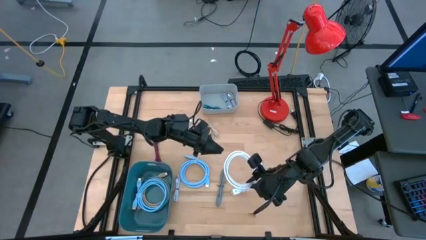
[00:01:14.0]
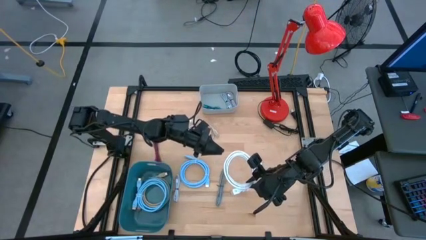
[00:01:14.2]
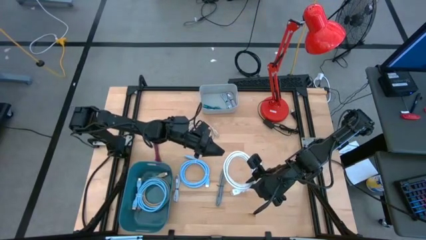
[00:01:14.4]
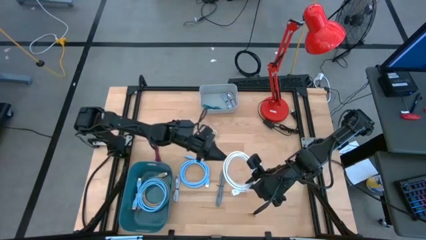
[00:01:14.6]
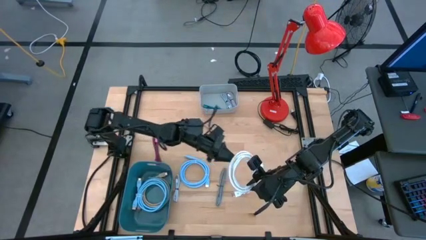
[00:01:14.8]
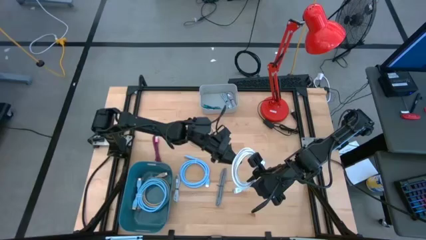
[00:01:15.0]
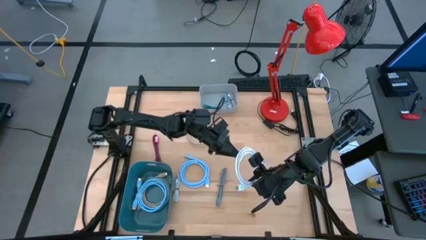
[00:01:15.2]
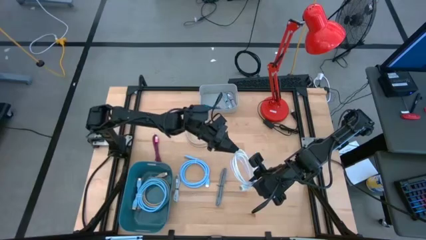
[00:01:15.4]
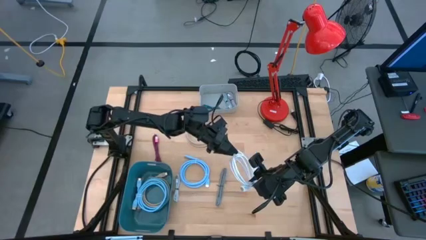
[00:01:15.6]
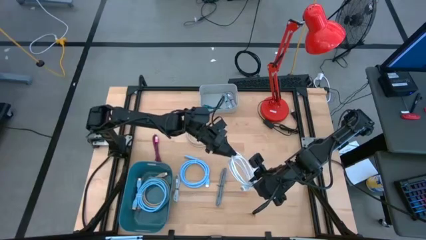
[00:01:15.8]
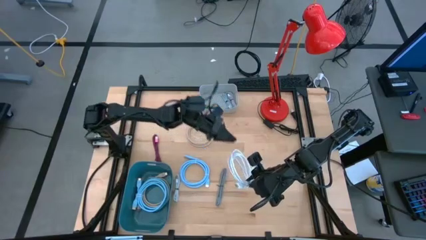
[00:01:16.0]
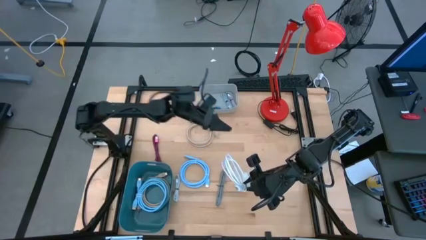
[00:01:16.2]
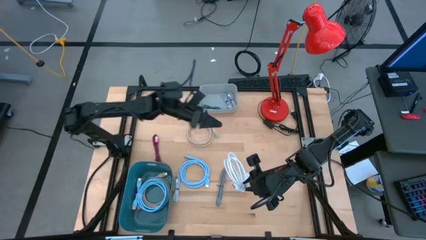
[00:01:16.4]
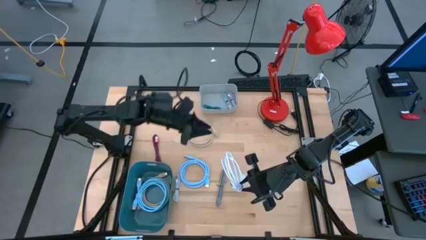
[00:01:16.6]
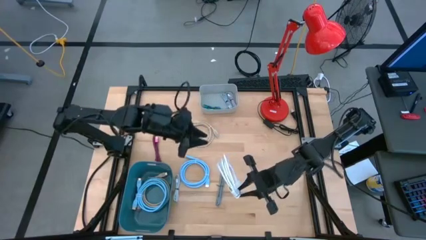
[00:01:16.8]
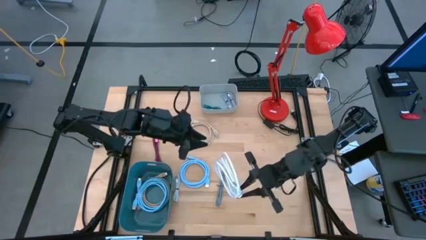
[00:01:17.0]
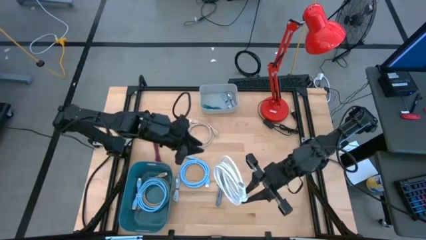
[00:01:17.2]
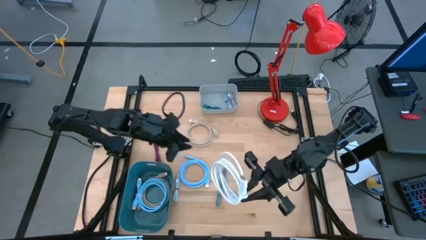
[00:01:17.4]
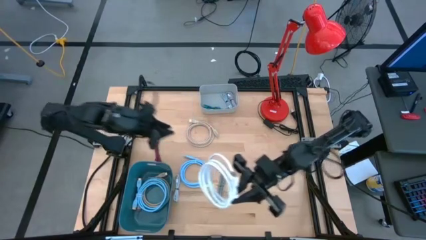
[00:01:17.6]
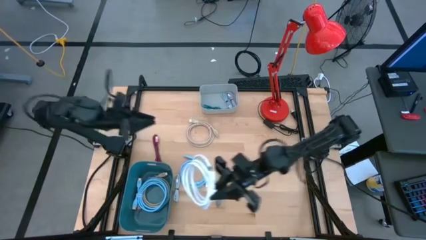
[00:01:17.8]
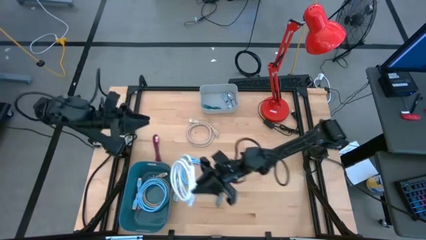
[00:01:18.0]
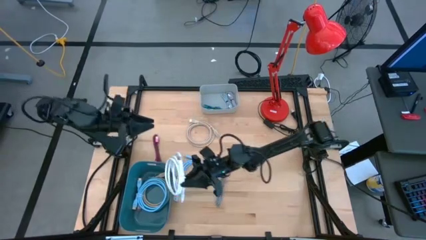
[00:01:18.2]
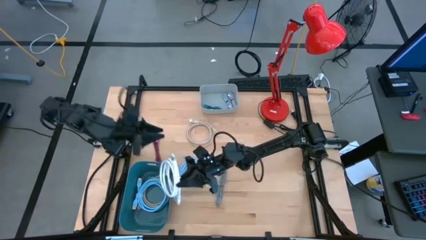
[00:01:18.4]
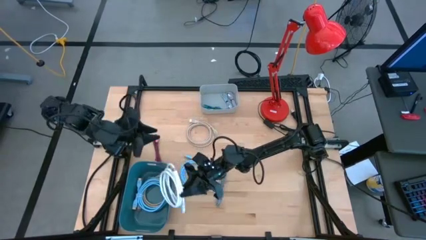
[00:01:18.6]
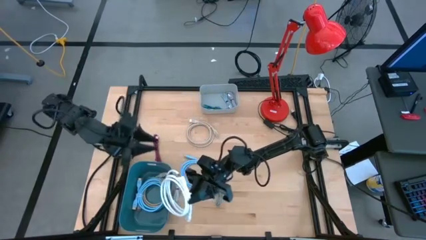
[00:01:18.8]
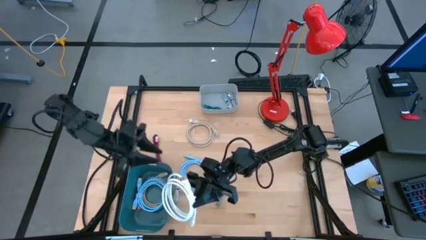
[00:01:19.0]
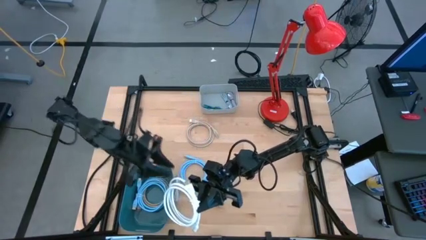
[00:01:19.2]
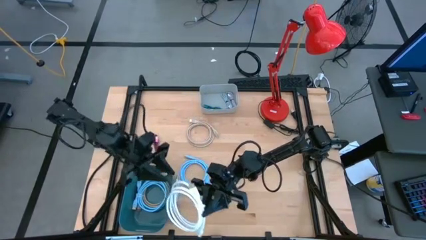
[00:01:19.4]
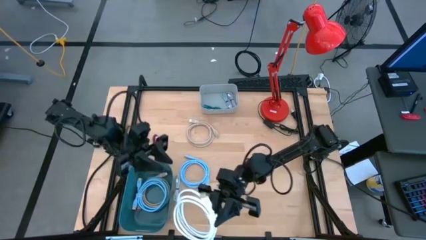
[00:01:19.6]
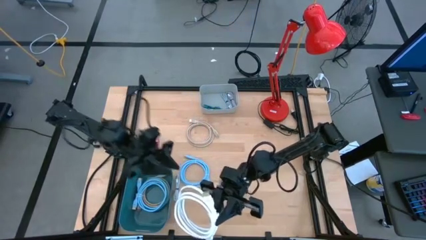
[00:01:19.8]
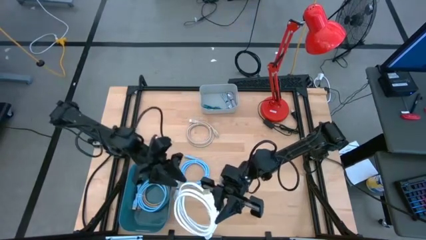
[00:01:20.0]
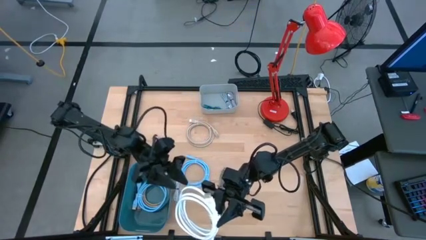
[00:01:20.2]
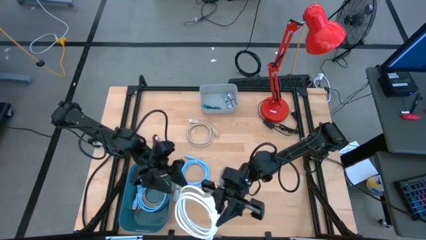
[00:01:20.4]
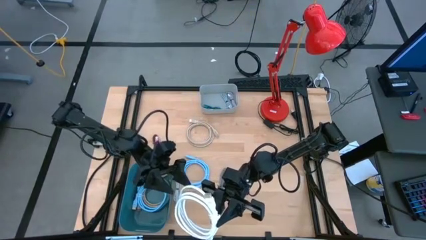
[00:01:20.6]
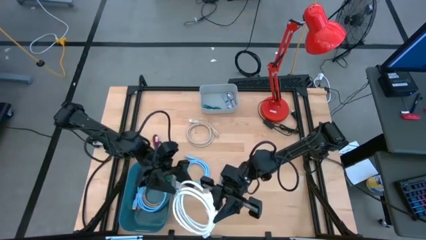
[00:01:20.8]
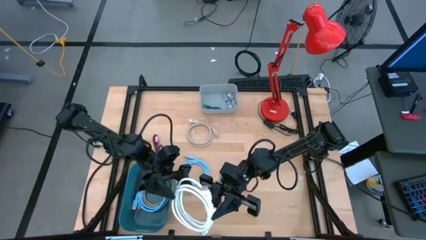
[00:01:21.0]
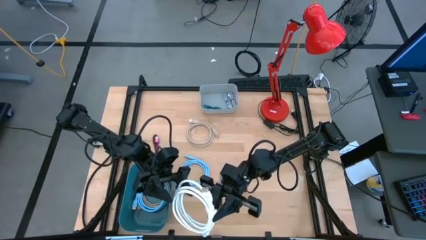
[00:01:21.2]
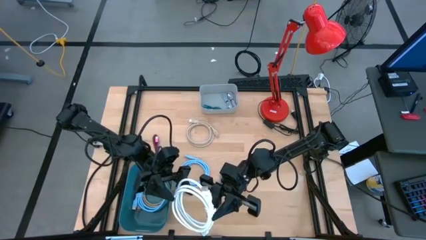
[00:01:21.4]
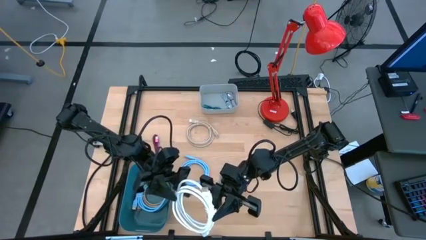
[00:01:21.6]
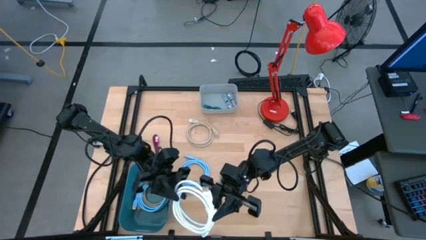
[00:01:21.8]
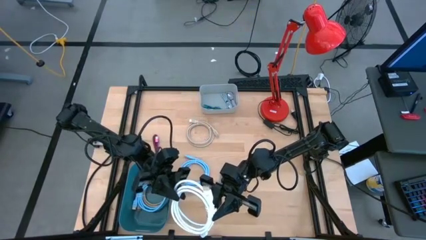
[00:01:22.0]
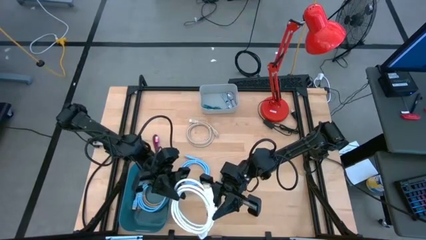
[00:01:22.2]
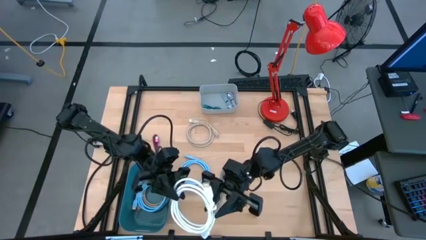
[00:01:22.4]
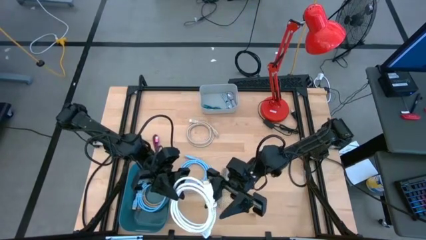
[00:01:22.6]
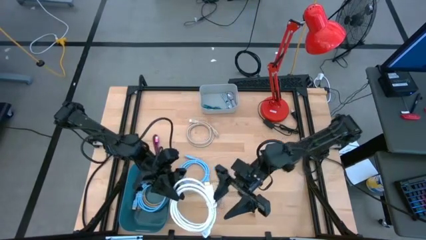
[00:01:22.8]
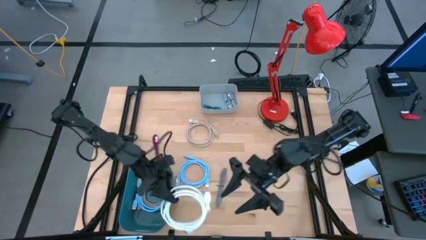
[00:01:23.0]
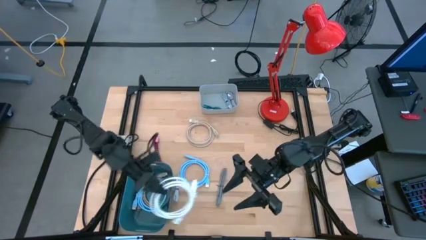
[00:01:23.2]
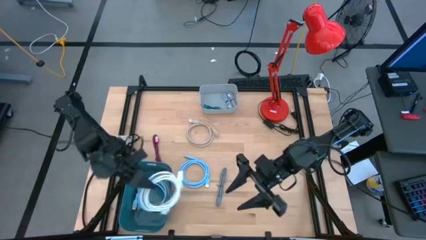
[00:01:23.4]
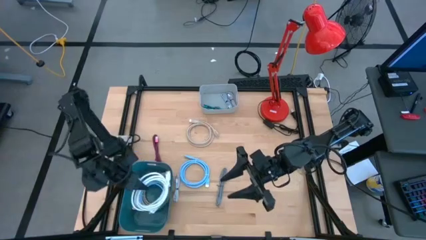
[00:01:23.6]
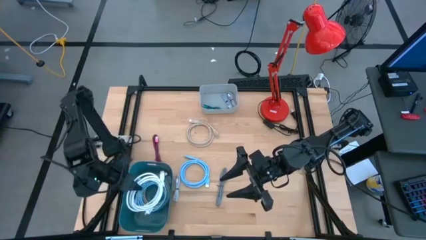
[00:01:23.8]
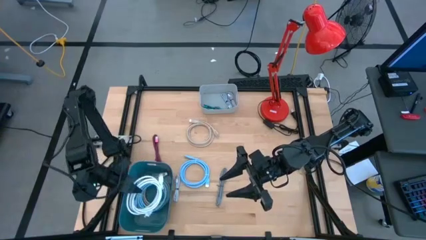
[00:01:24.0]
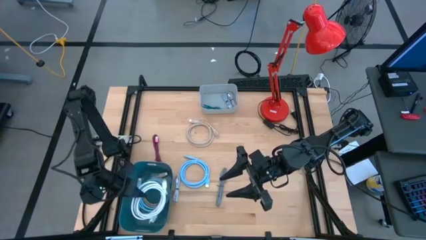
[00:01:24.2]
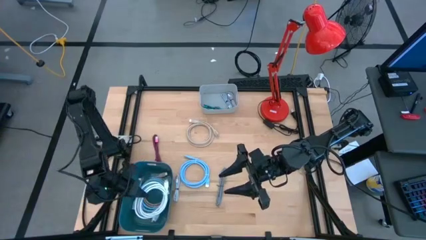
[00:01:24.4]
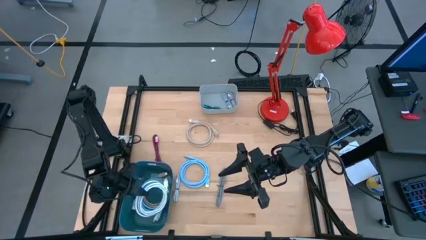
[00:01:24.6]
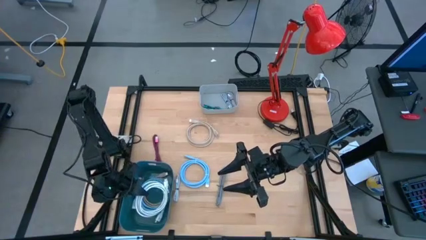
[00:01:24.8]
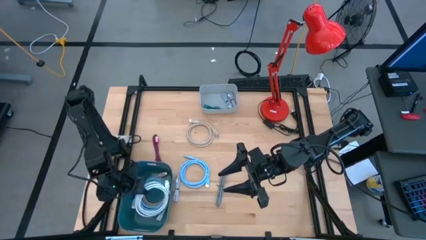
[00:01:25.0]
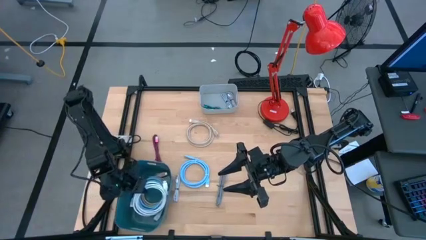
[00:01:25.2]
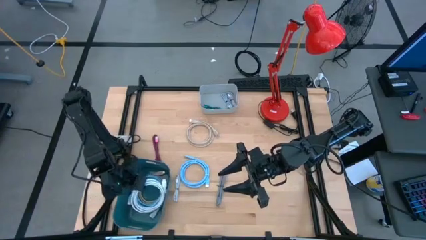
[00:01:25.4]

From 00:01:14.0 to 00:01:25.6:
Task: Pick & Place USB Port
Put the white HDMI cable into the blue bin

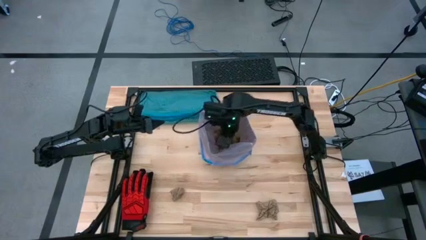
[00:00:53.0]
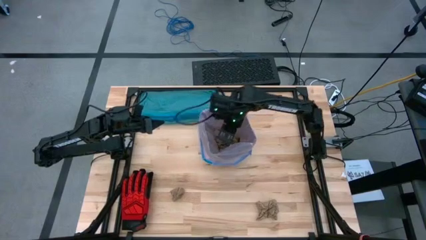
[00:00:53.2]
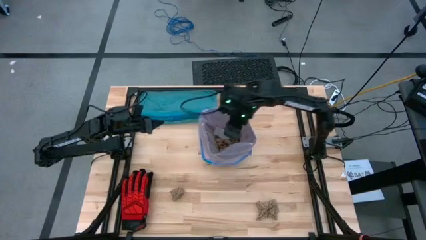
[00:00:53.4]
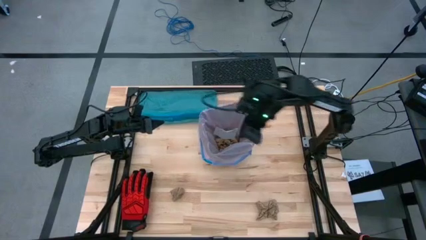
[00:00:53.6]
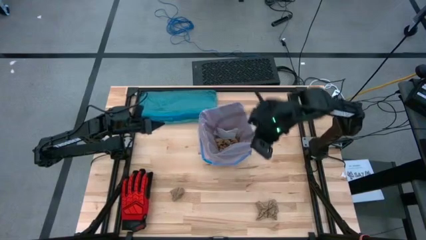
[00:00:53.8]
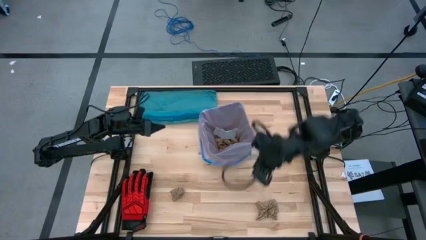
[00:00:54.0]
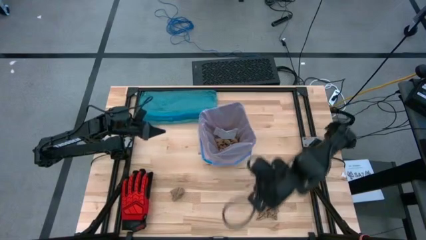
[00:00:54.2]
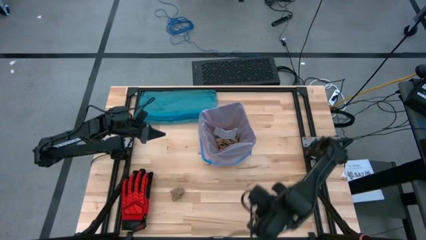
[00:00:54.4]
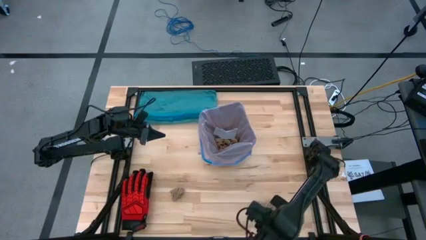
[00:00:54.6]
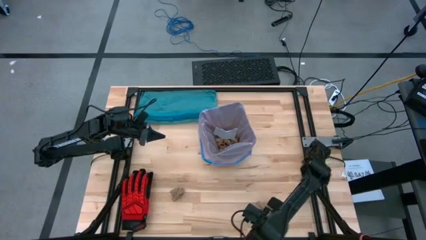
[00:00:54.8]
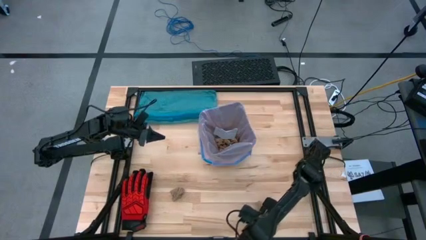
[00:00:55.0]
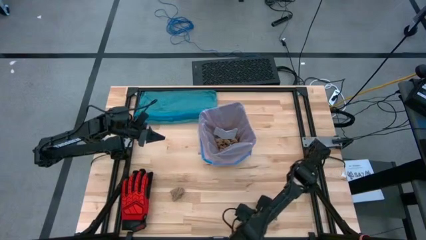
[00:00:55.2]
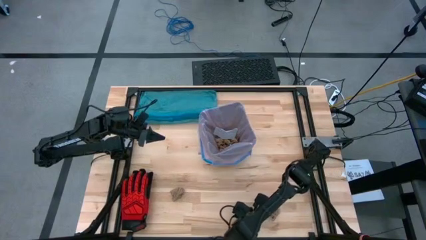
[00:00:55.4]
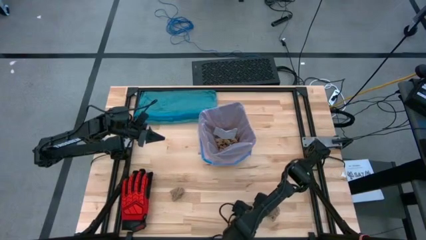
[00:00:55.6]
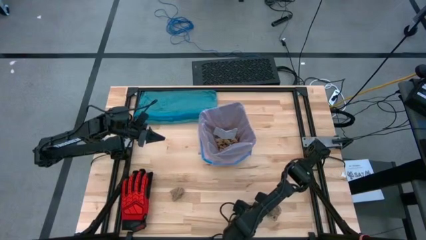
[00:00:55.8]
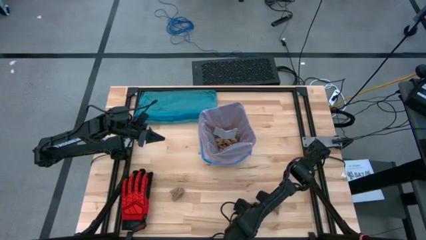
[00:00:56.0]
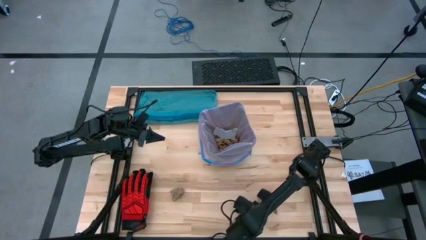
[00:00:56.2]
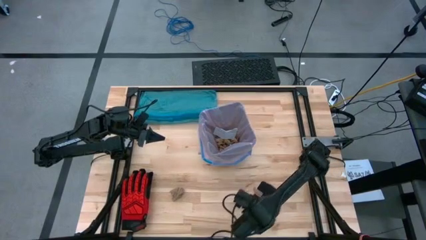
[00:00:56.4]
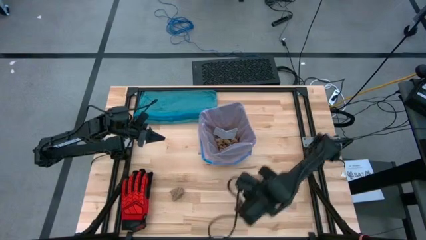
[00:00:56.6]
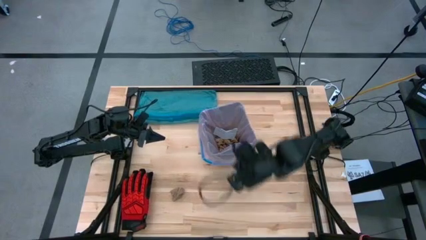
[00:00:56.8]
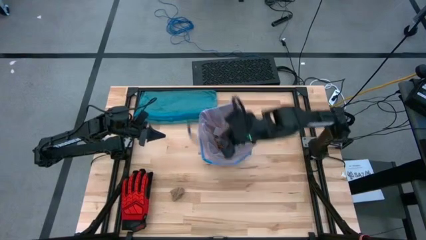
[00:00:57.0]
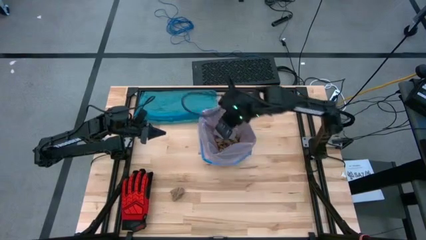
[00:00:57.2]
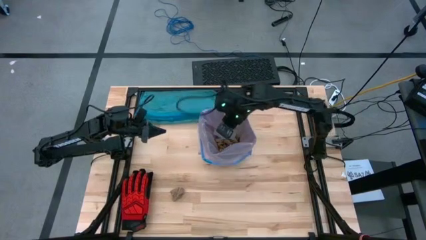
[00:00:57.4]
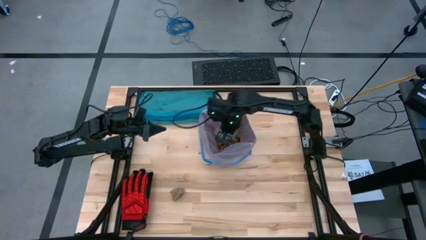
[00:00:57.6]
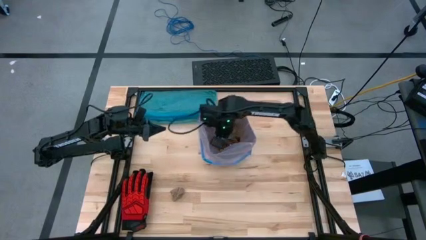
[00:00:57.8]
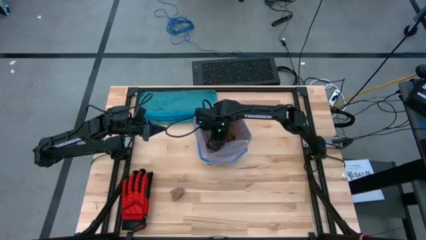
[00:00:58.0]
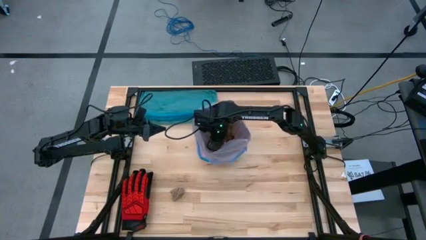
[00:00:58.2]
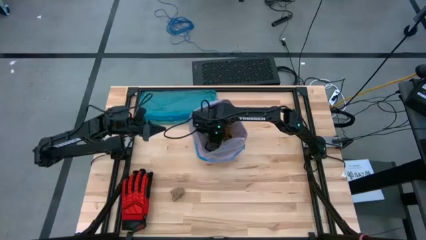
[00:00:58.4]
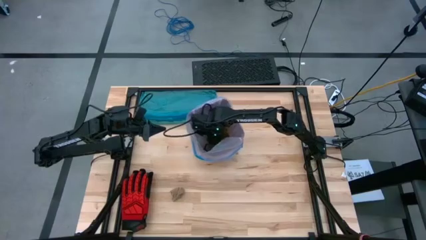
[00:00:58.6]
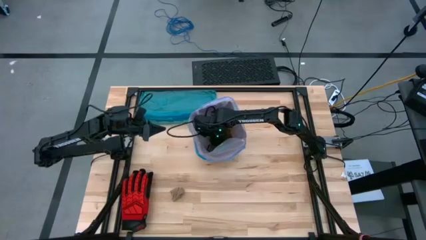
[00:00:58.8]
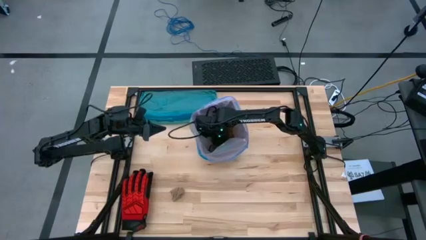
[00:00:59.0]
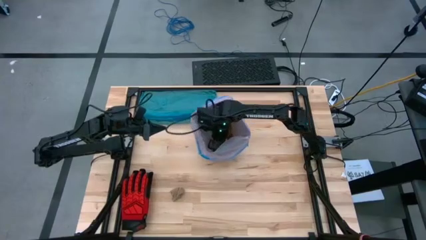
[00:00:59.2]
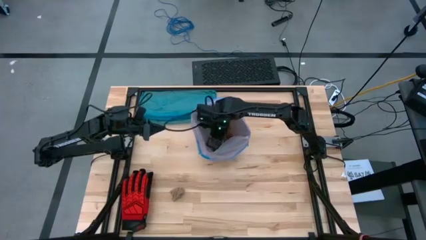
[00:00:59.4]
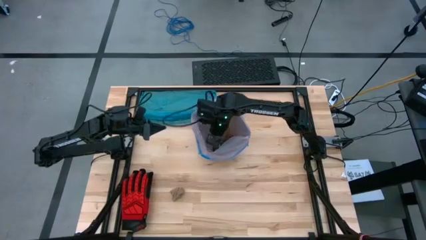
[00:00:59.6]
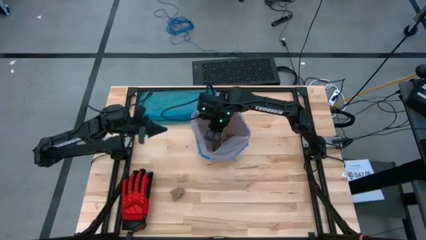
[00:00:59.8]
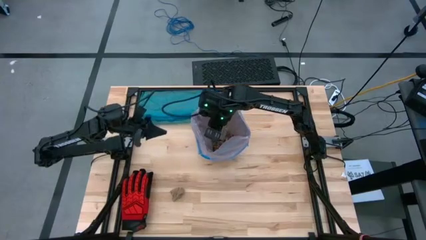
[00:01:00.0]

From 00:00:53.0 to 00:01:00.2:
Task: place trash/remove bag and relplace
Put the brown napkin into the trash bin
